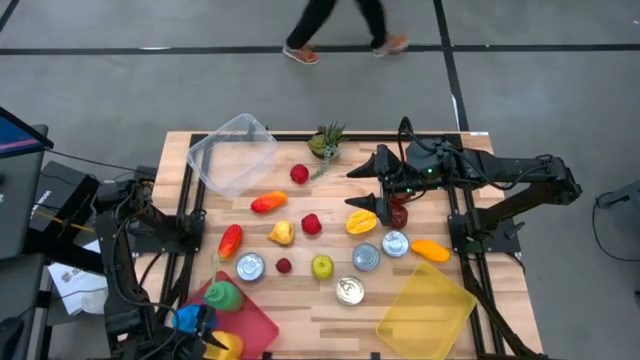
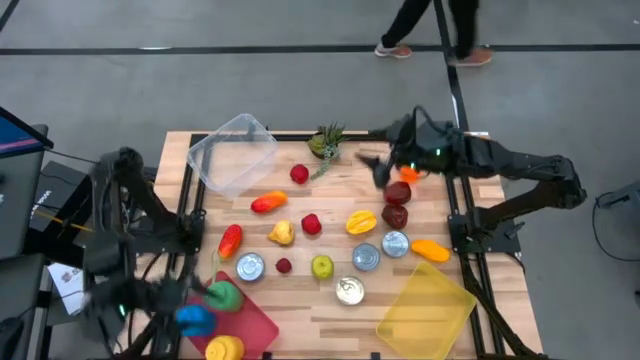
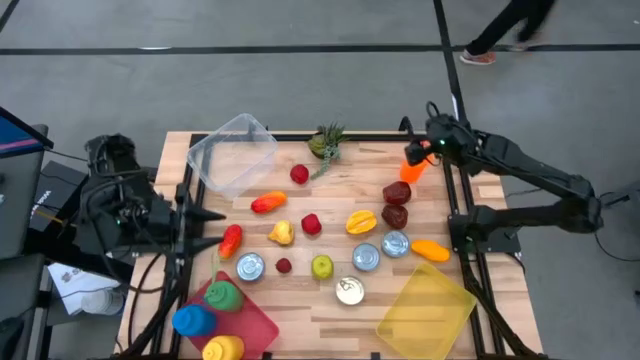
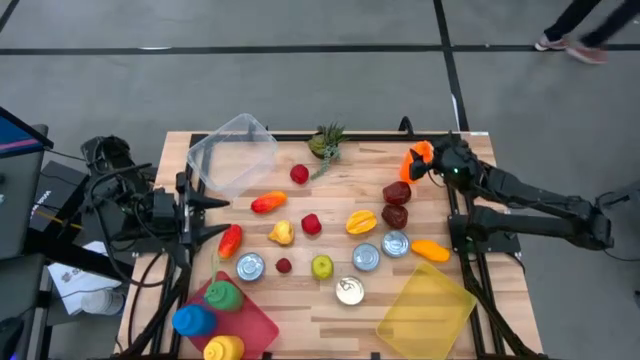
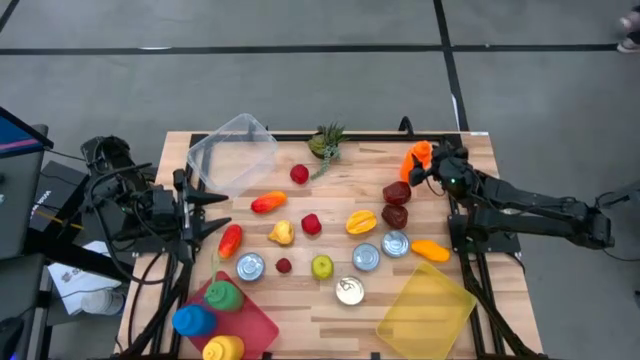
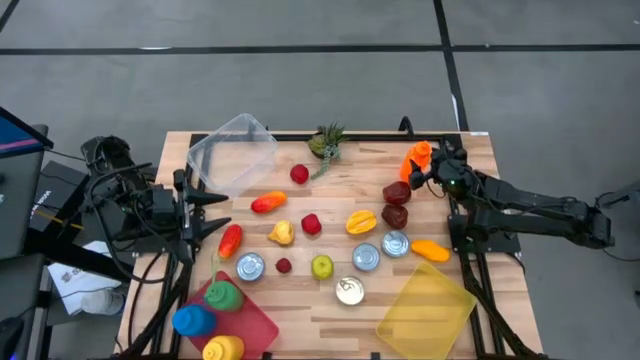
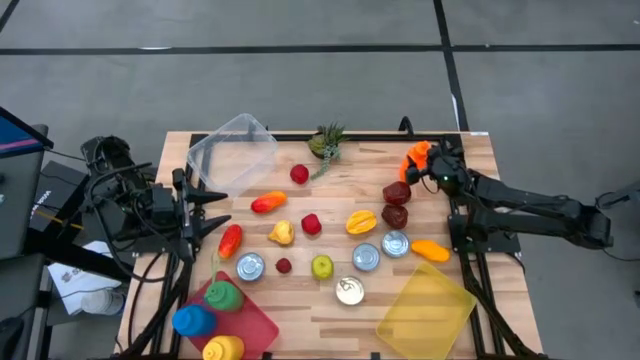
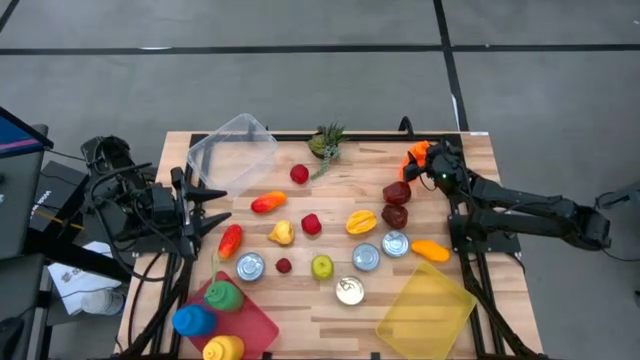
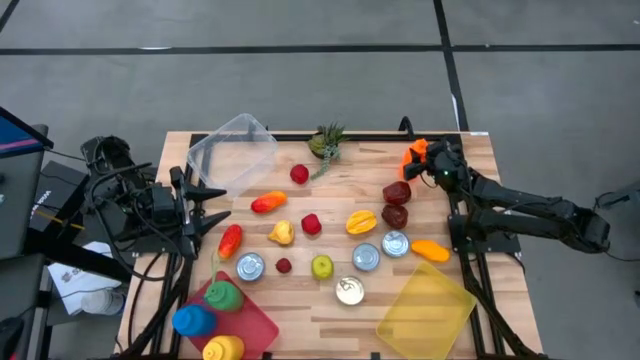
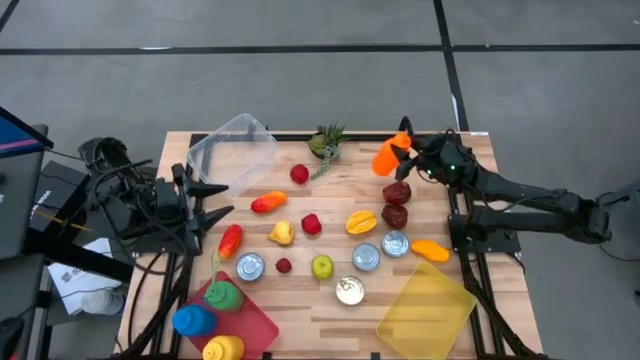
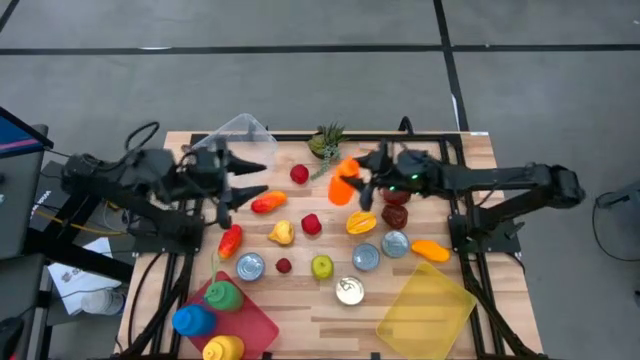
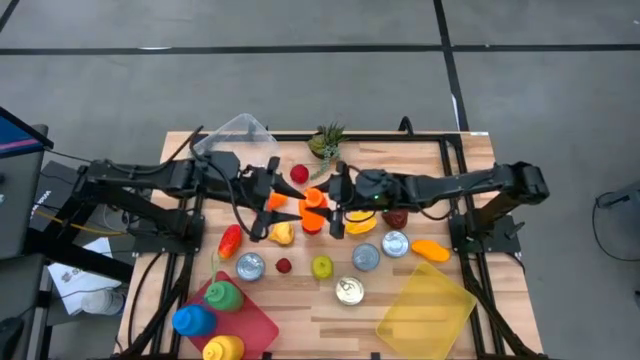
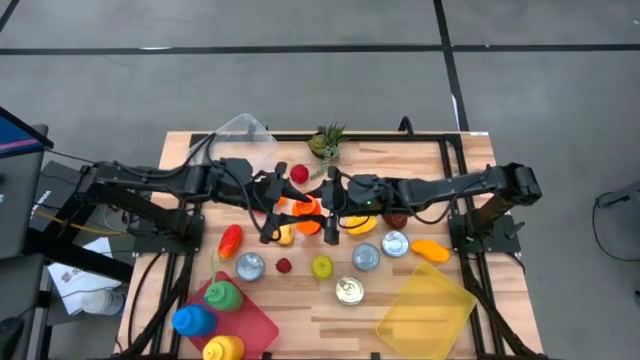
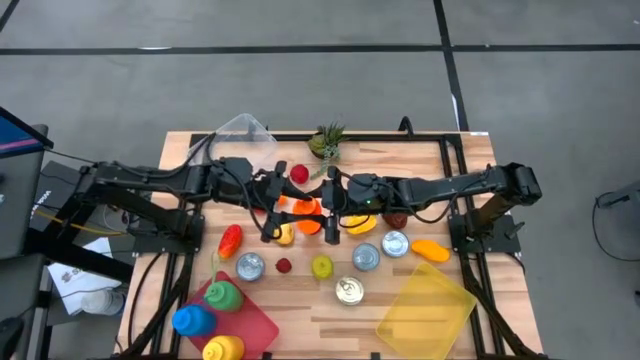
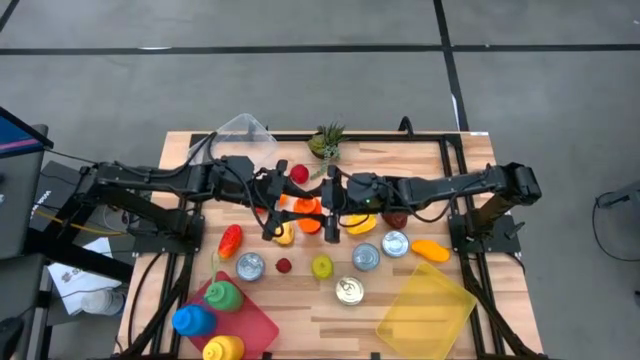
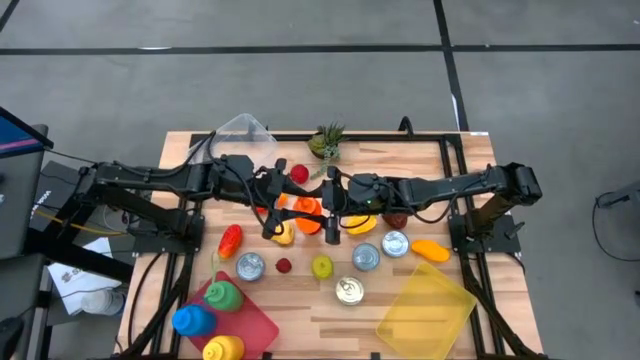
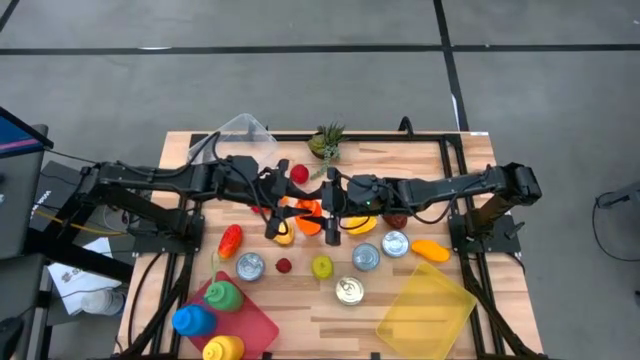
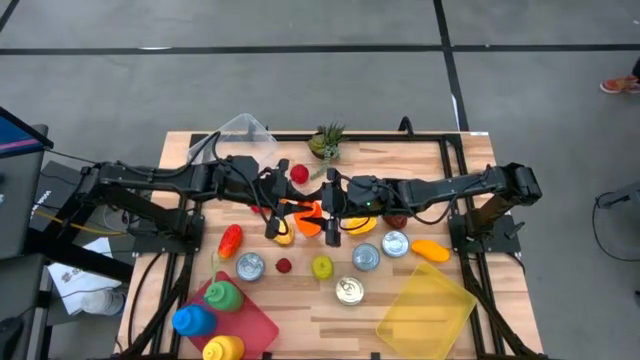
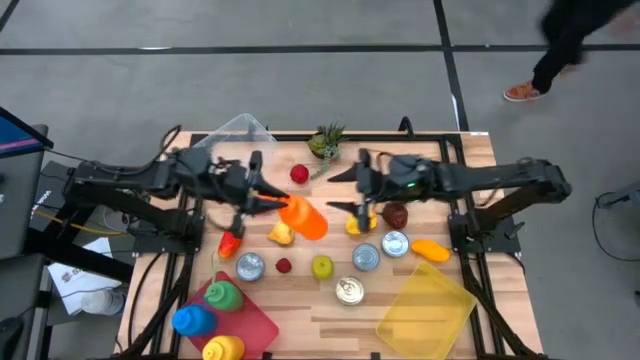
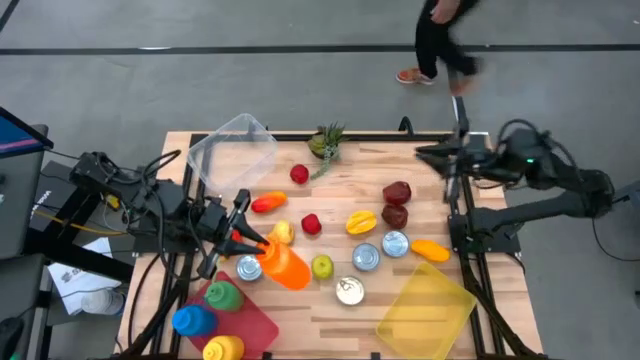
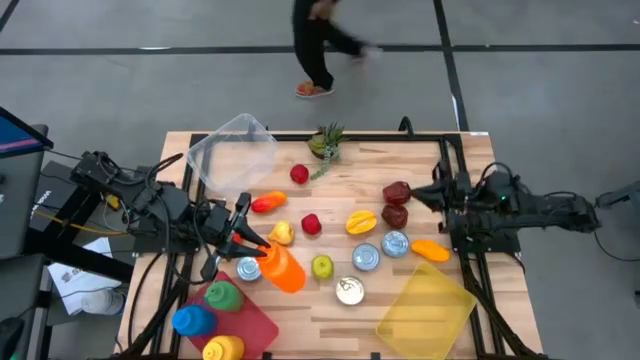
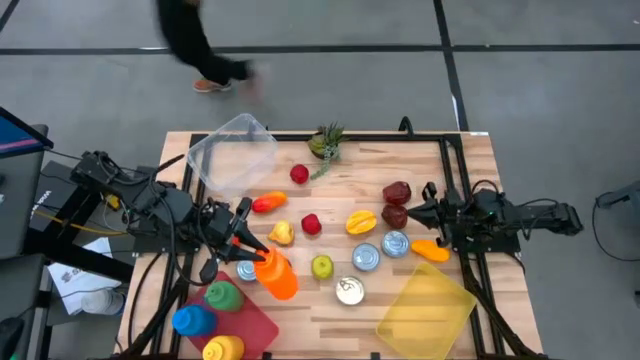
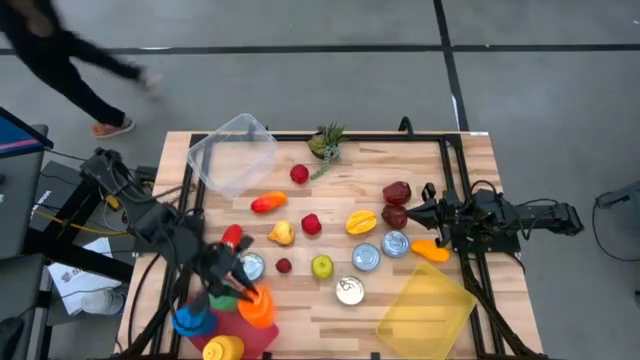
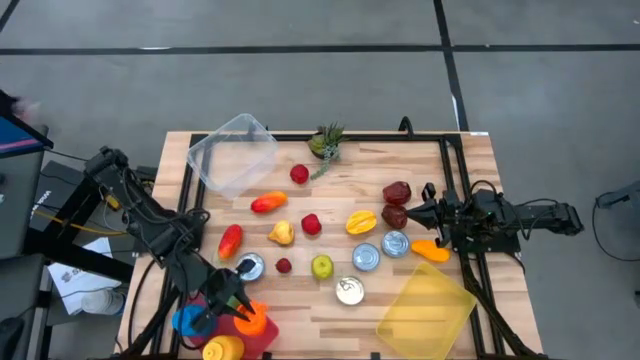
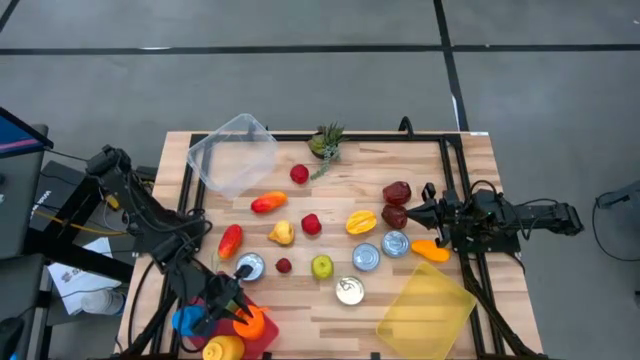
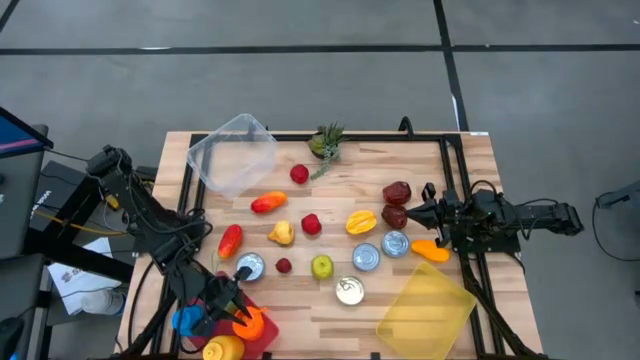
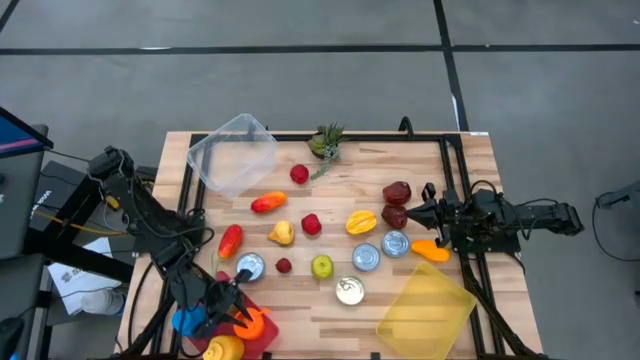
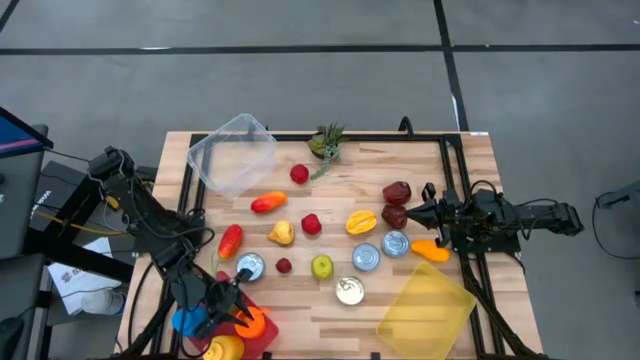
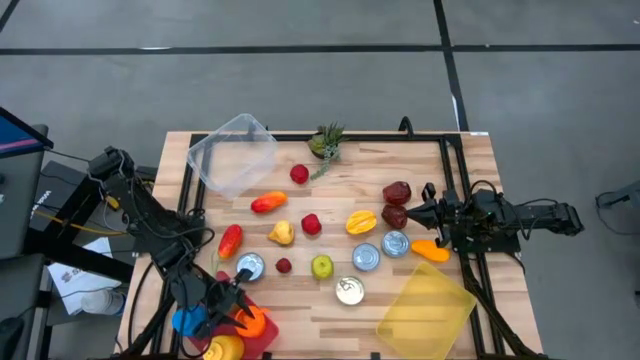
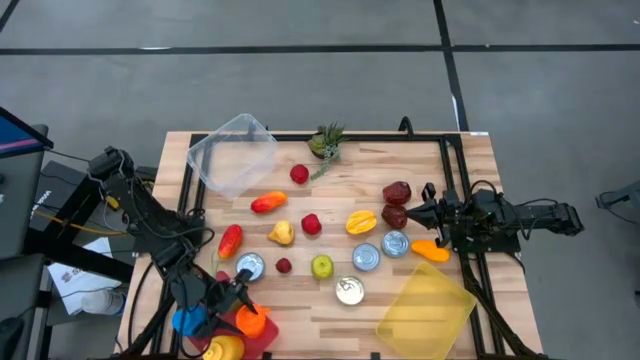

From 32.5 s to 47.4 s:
Task: Pick & Place Food Item
Put the orange water bottle into the red bin

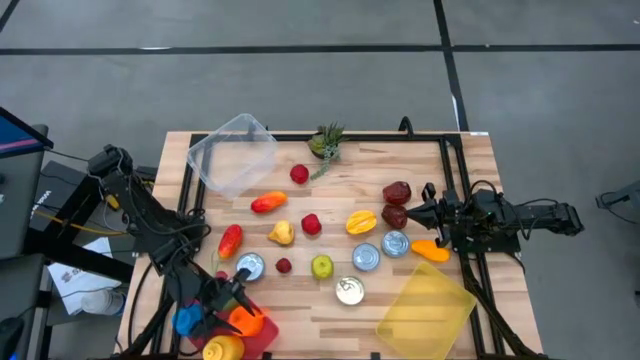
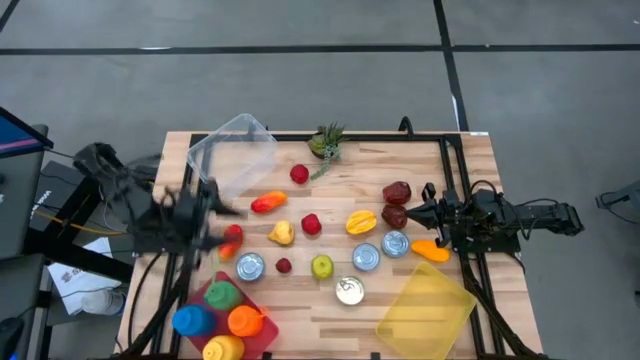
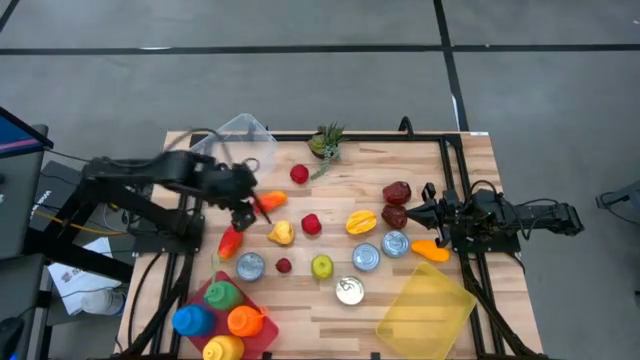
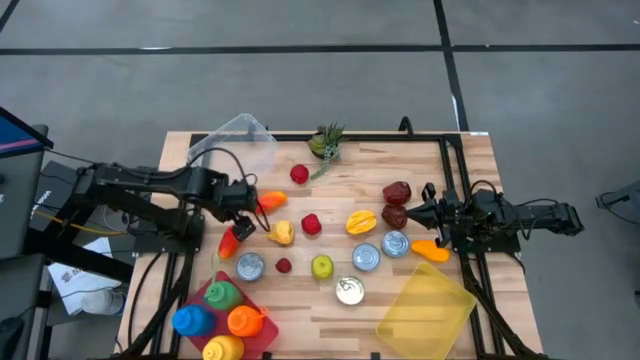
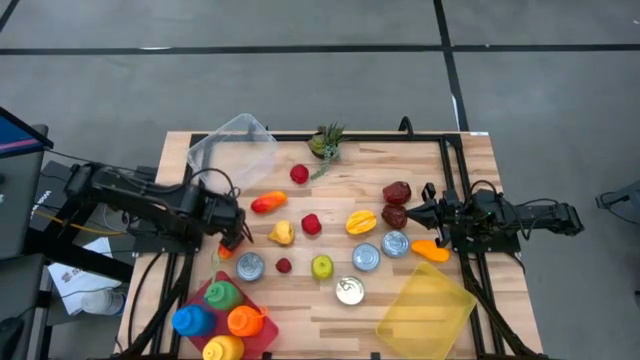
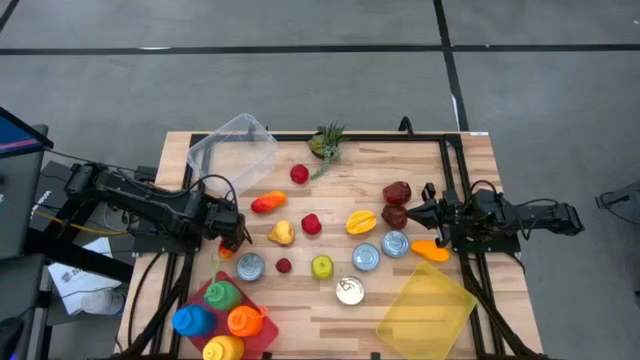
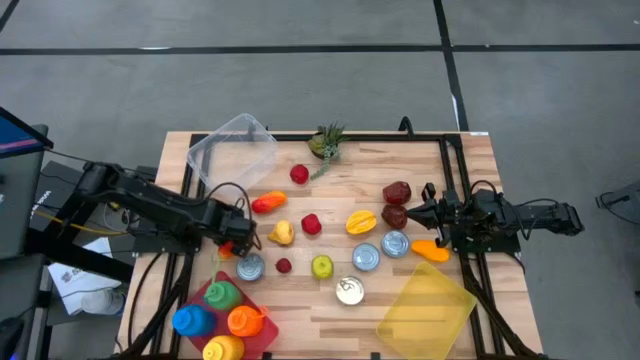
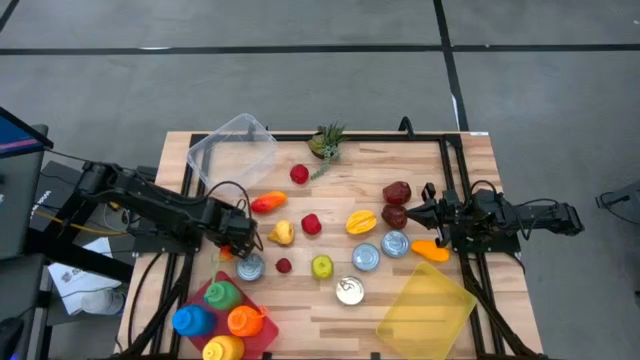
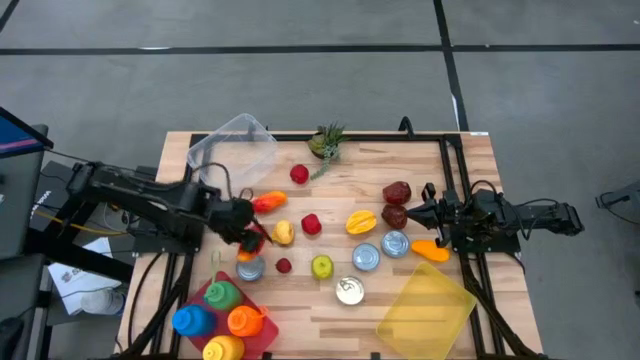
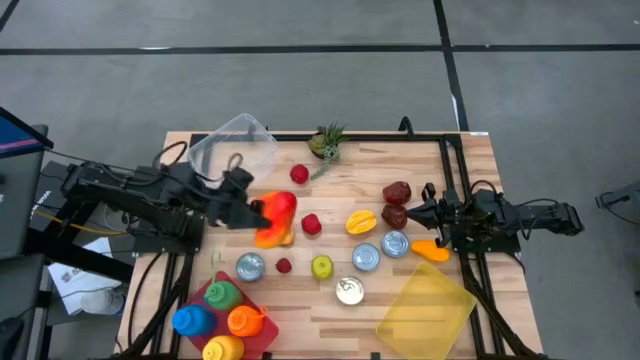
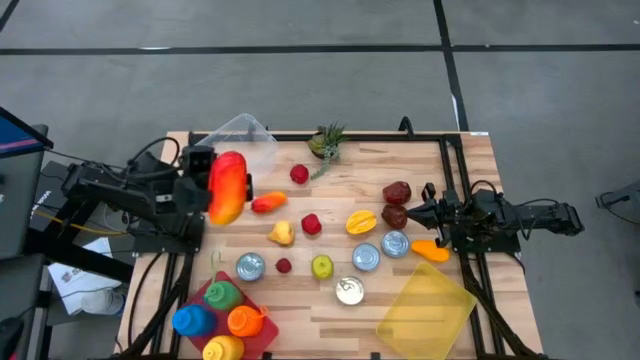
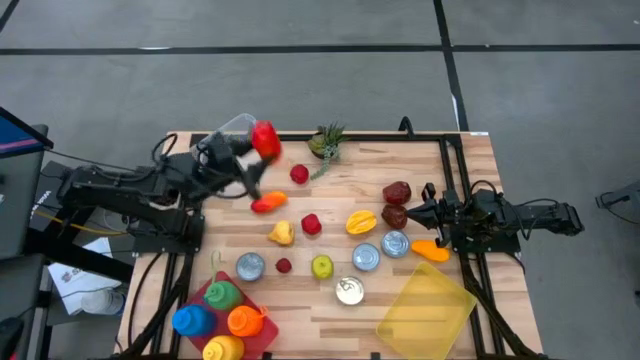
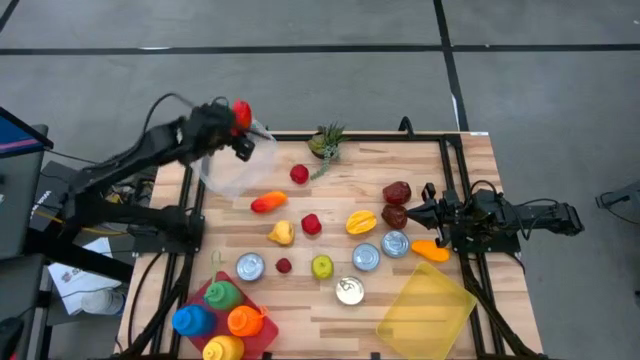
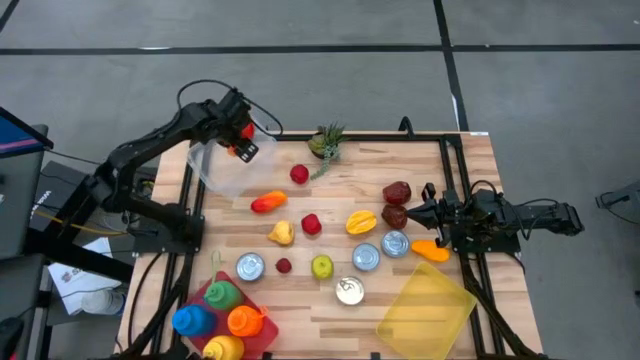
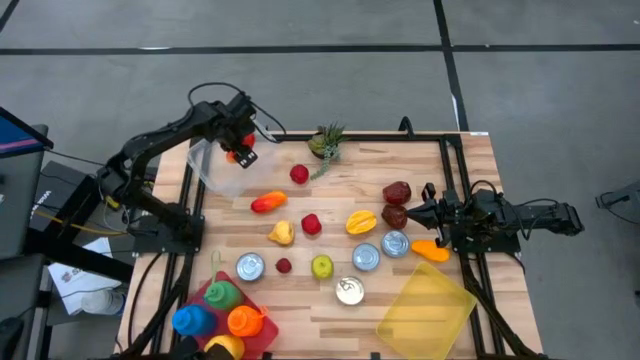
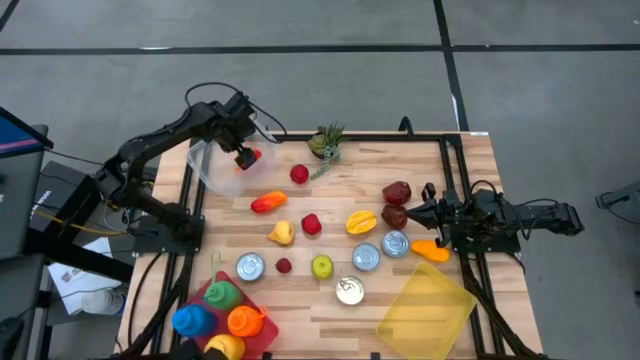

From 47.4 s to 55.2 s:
Put the left orange red mango into the transparent bin
